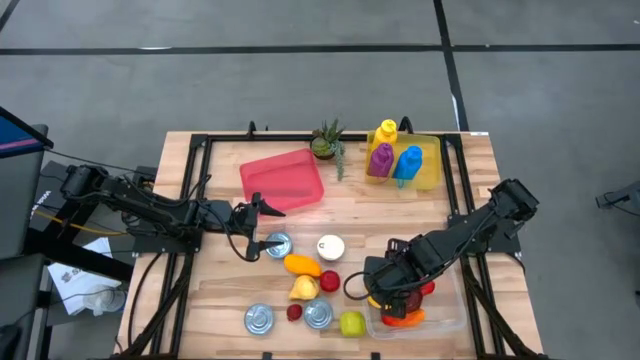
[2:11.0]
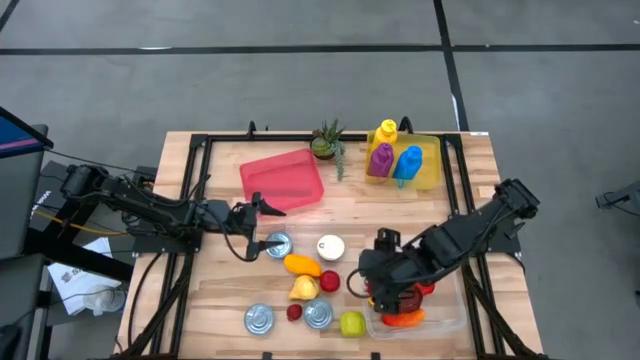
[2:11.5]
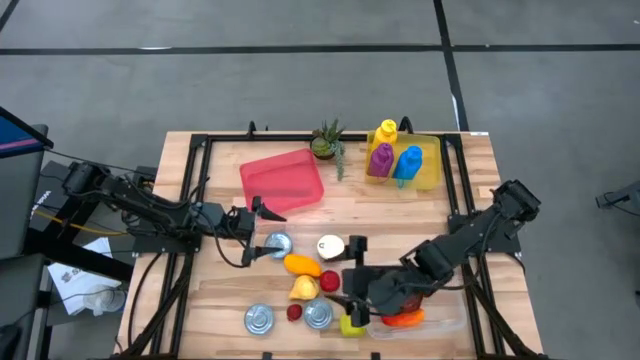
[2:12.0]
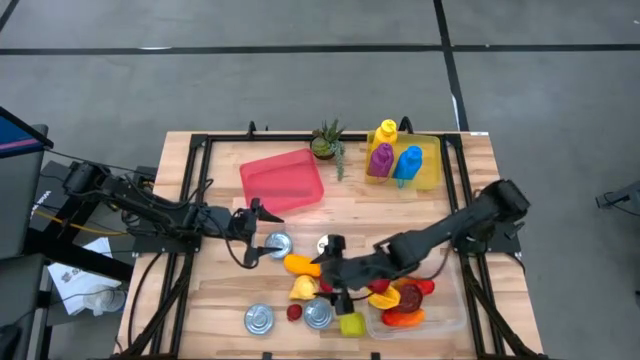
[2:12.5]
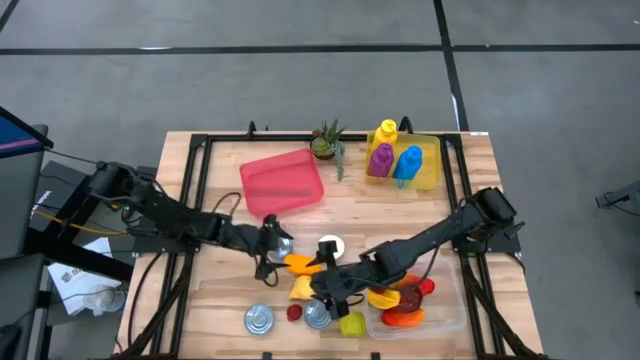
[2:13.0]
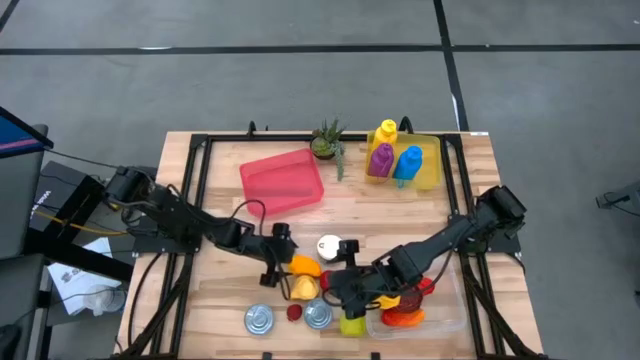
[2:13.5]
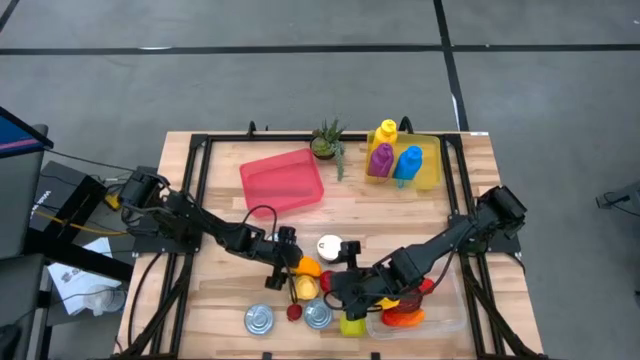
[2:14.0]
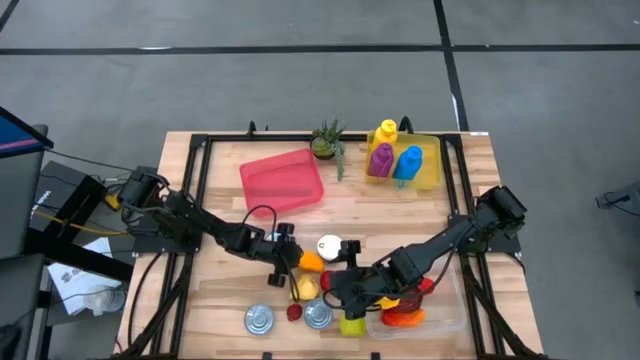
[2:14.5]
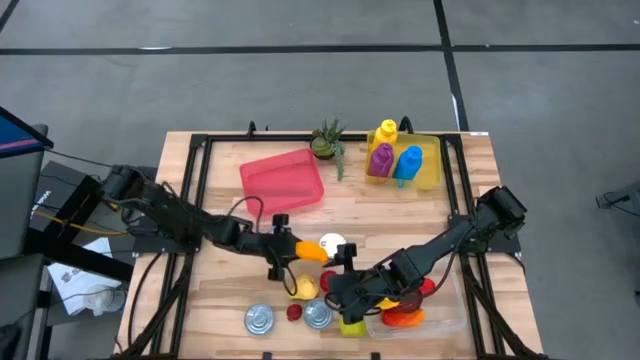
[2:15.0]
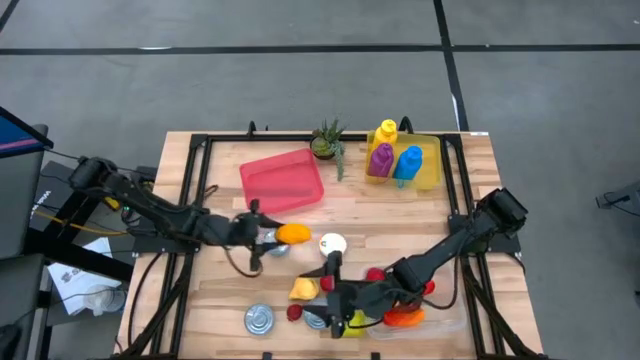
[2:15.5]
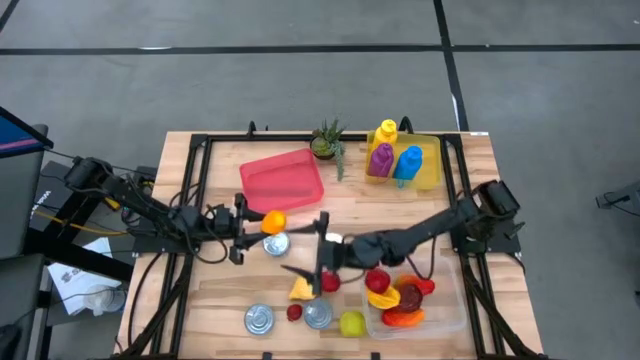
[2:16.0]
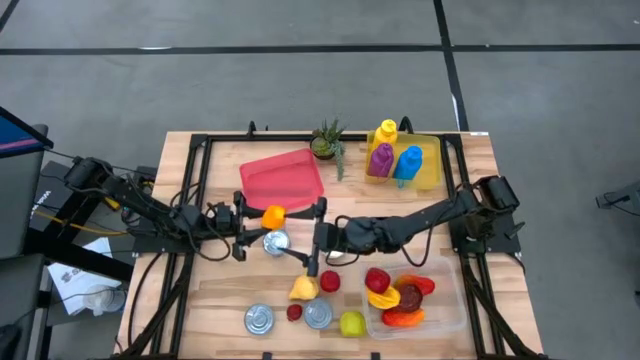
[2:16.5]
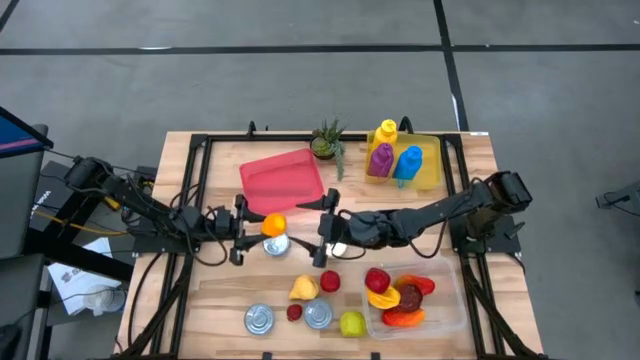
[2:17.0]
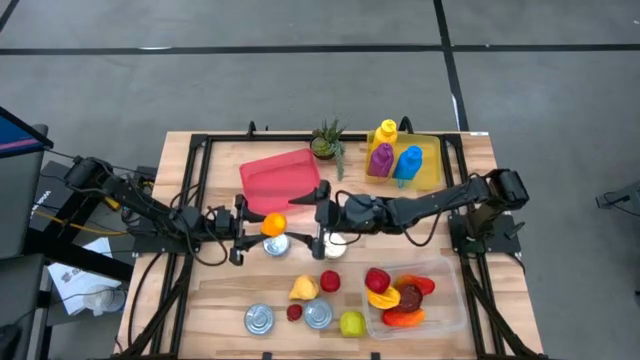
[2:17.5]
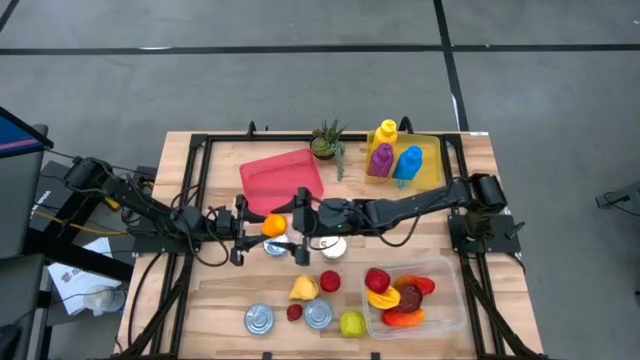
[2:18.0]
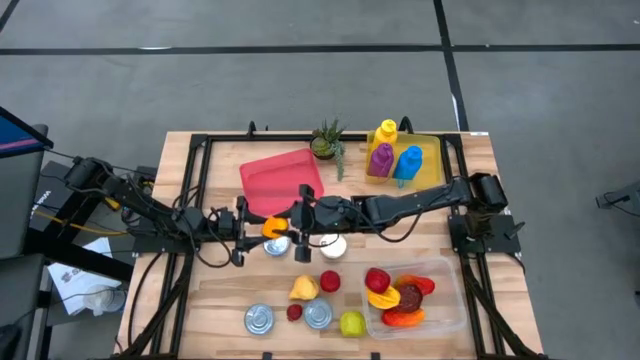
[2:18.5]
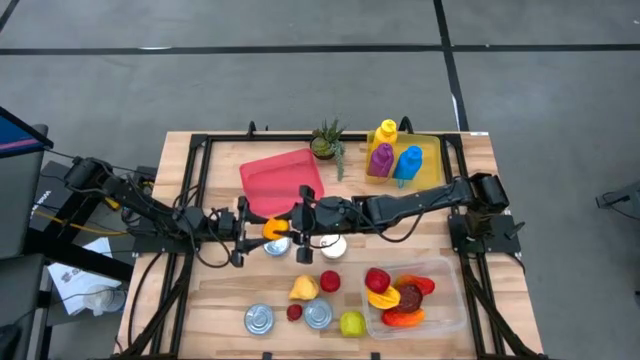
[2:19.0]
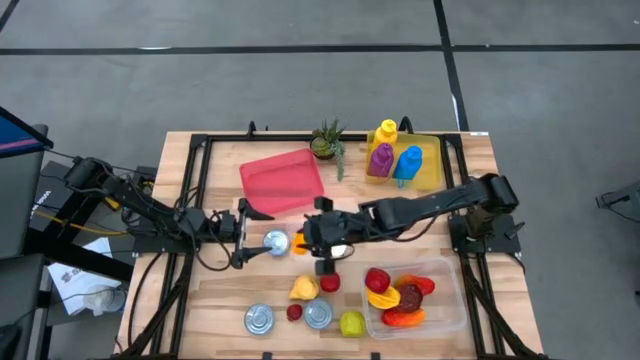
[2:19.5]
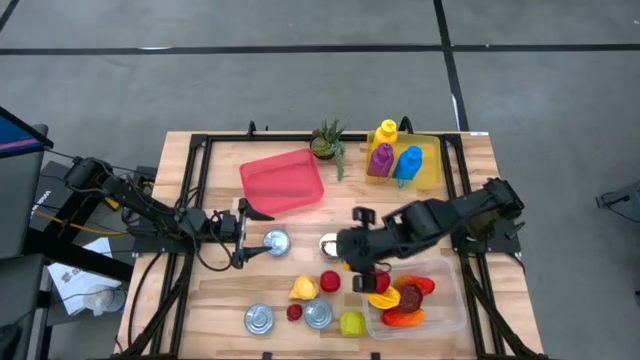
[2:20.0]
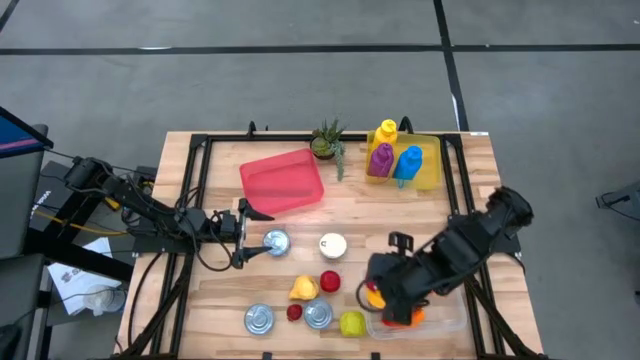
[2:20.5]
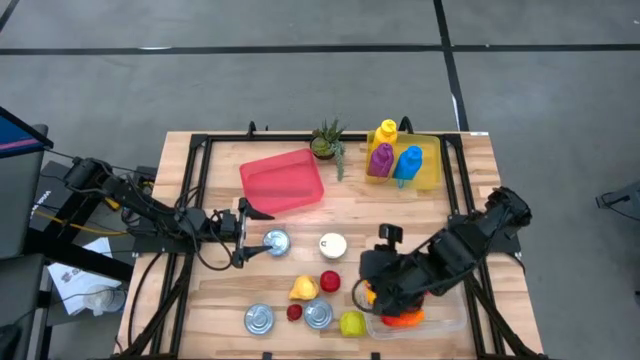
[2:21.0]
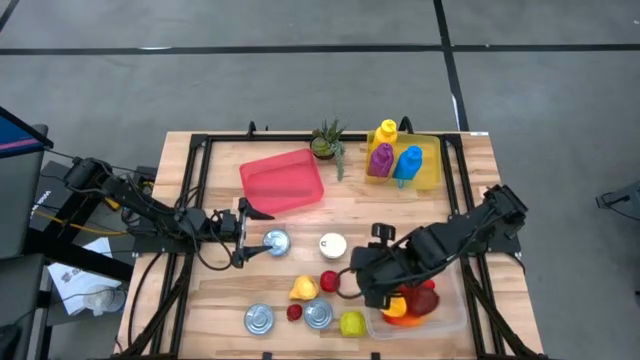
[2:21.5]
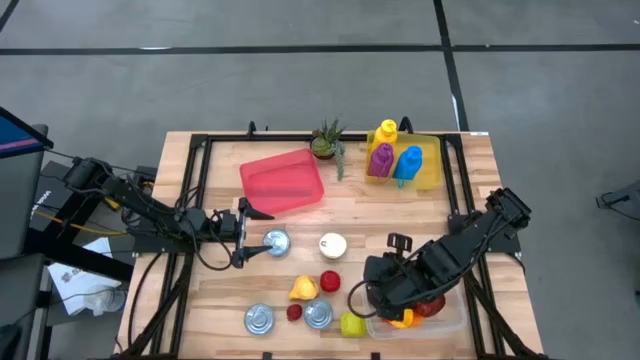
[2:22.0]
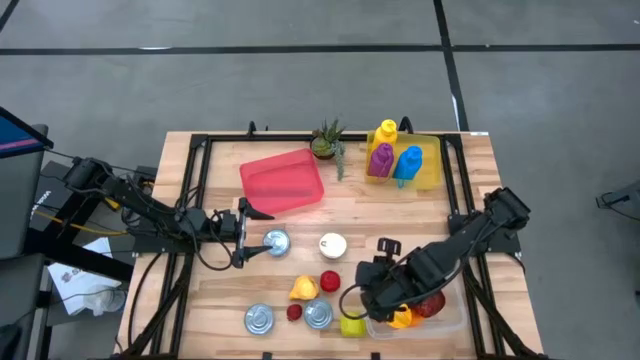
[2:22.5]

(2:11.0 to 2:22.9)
Task: Pick & Place Food Item
Put the yellow mango into the transparent bin

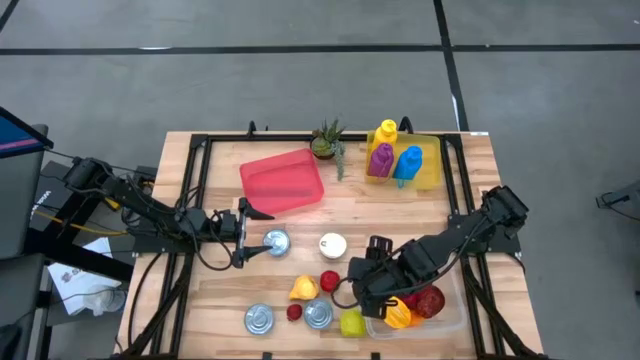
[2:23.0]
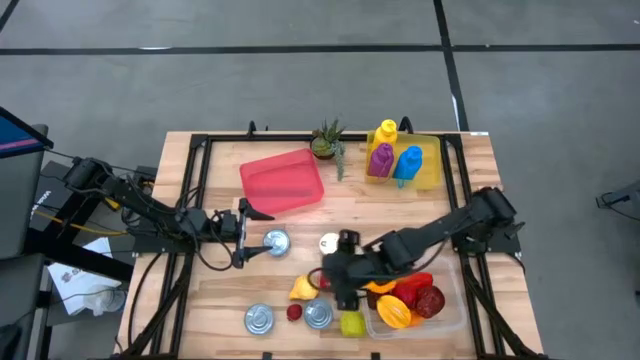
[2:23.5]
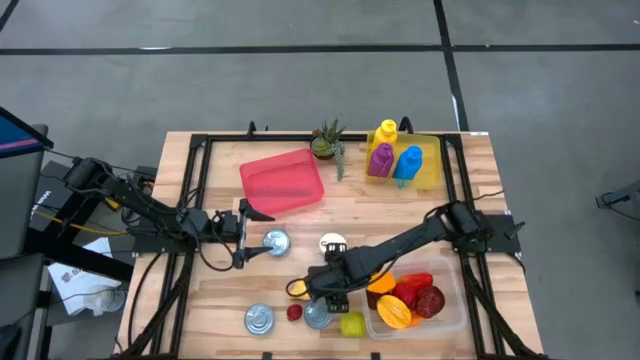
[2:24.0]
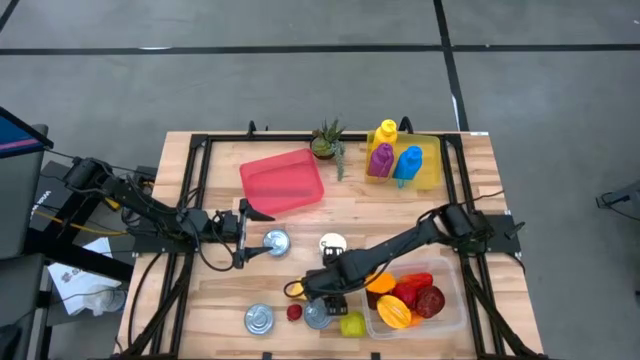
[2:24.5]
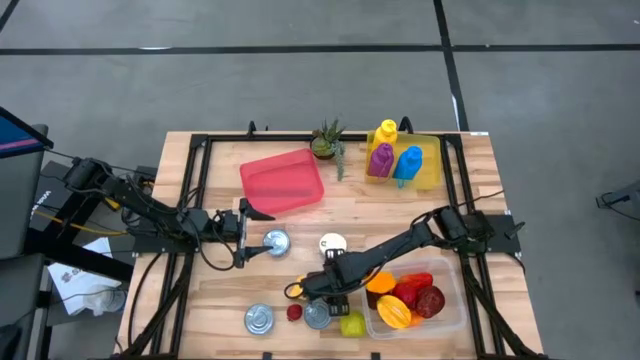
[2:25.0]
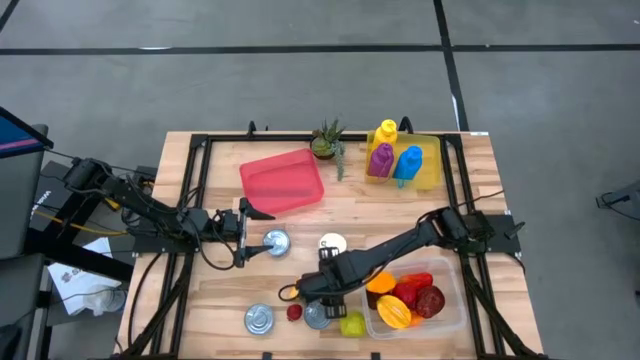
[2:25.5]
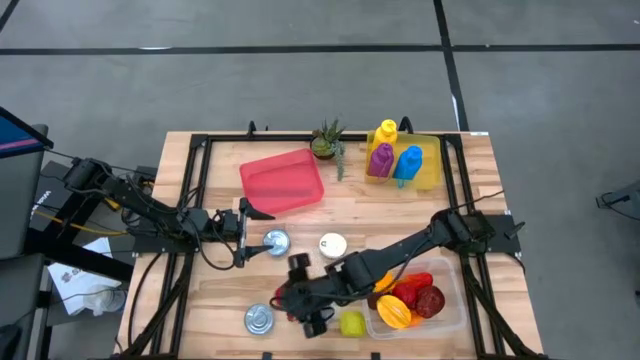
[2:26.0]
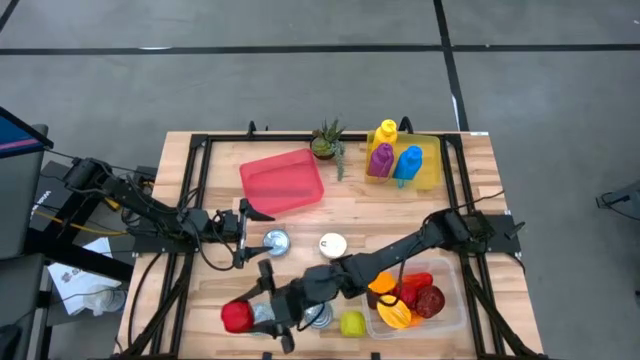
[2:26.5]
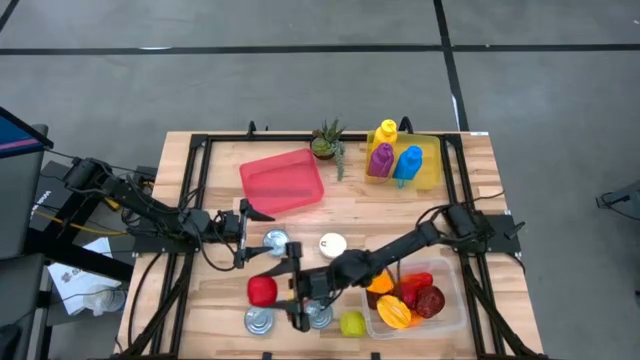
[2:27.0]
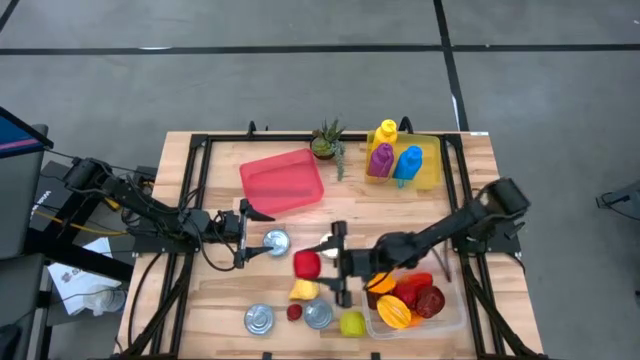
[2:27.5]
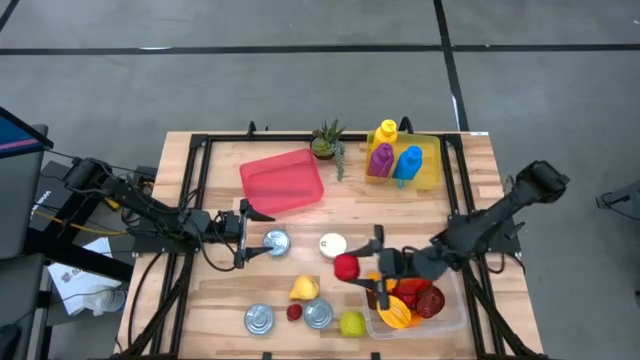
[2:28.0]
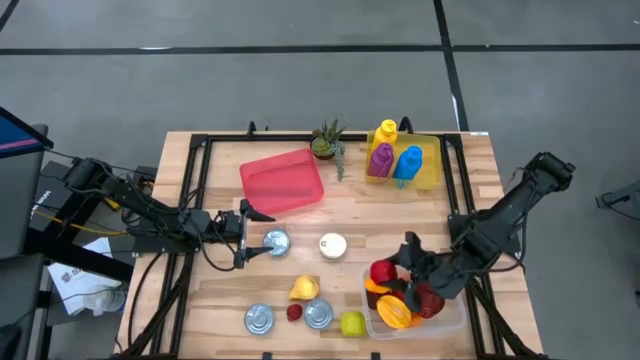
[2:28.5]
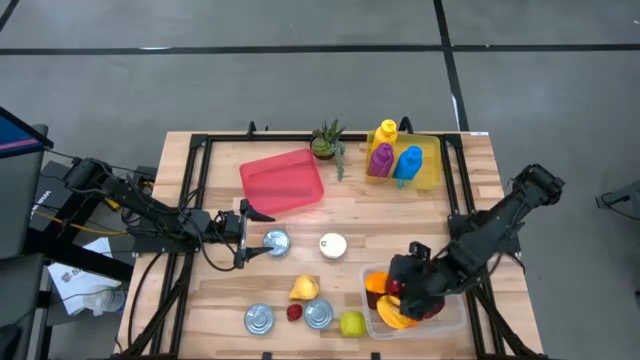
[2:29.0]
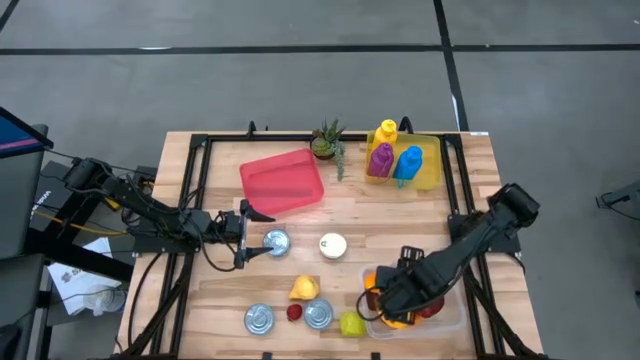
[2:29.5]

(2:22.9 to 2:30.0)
Put the red tomato into the transparent bin

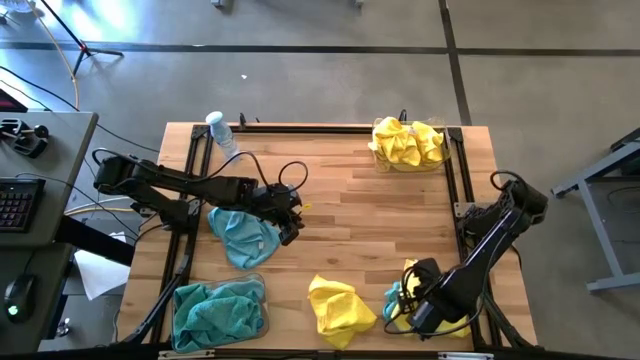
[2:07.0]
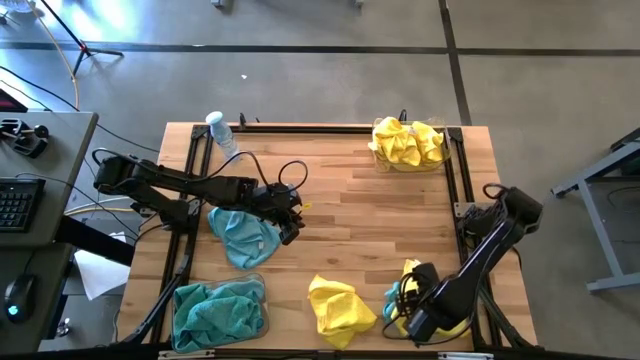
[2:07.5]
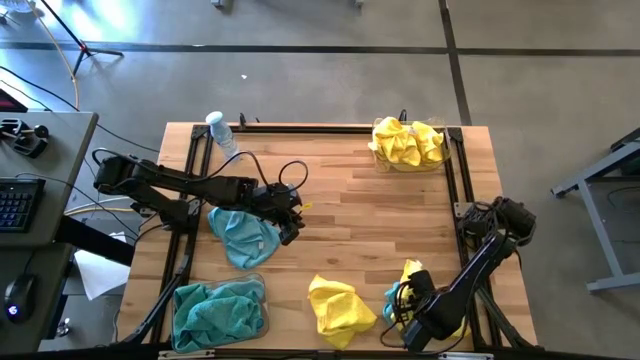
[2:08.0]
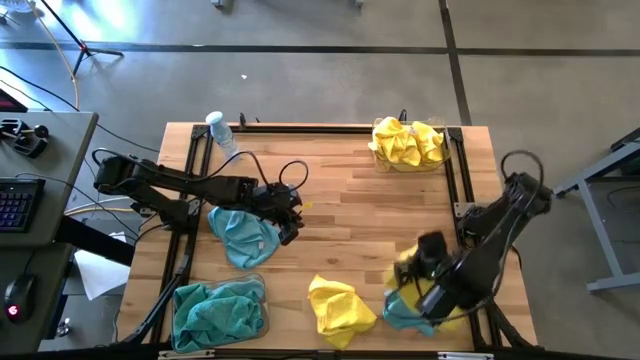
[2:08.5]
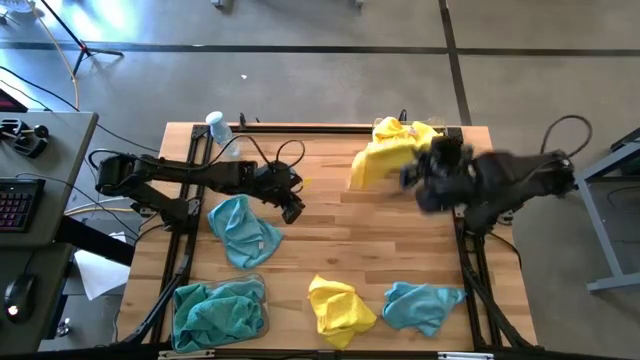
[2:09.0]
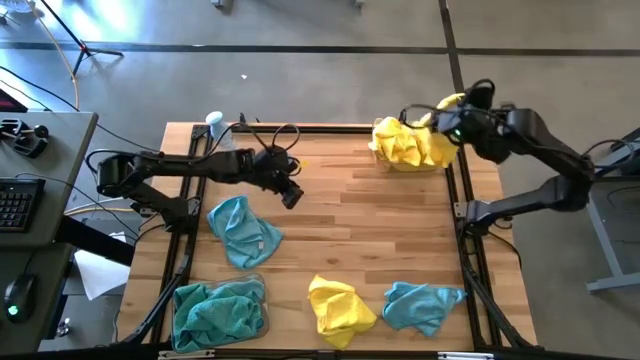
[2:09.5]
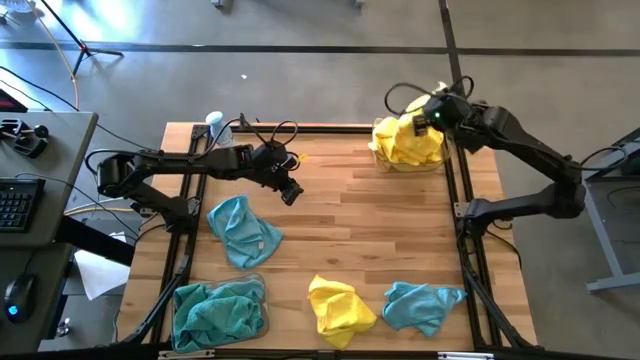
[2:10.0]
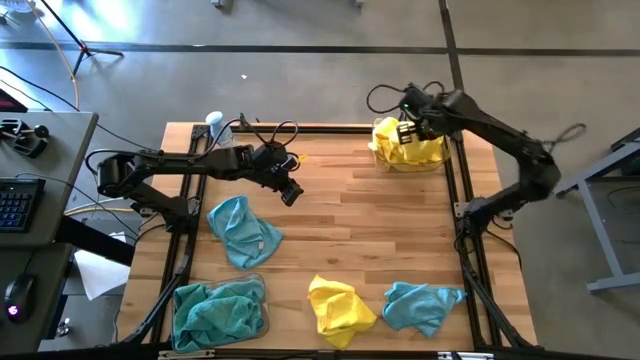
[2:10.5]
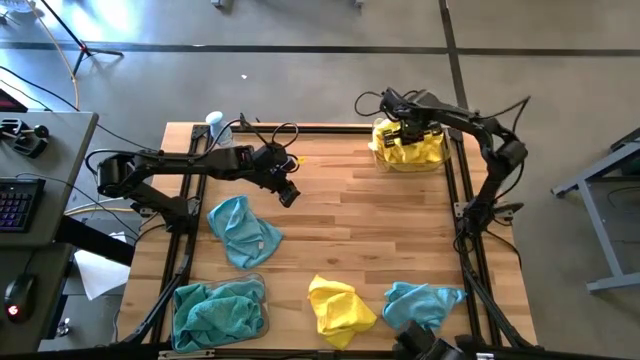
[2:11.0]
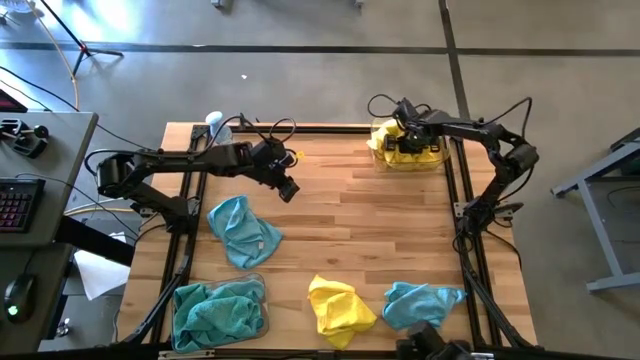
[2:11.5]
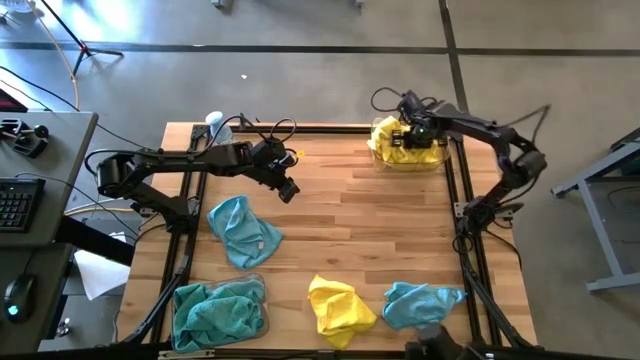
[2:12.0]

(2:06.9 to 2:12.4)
Task: Sort microfiber towel by color & place in baskets
Put the yellow microfiber towel into the top transparent bin
